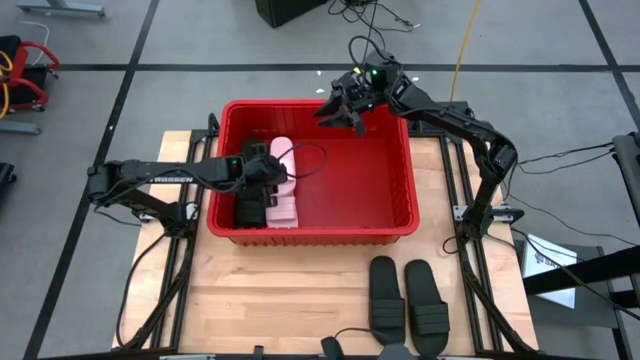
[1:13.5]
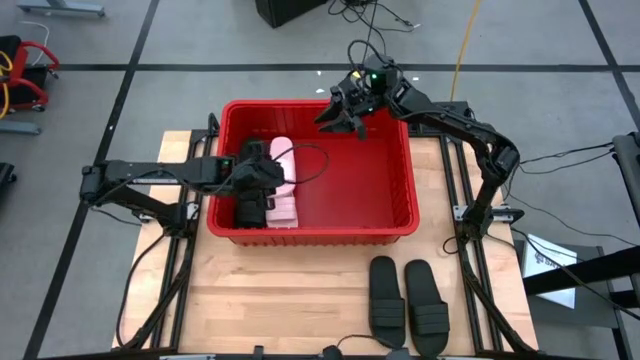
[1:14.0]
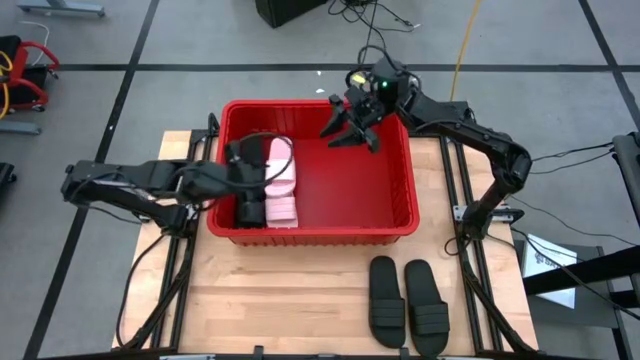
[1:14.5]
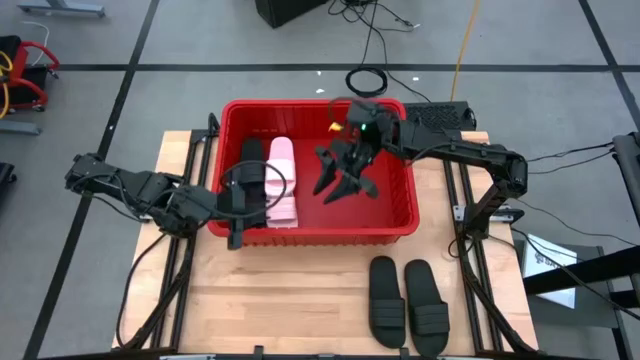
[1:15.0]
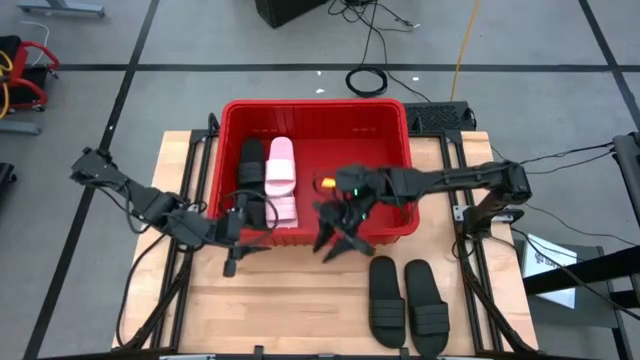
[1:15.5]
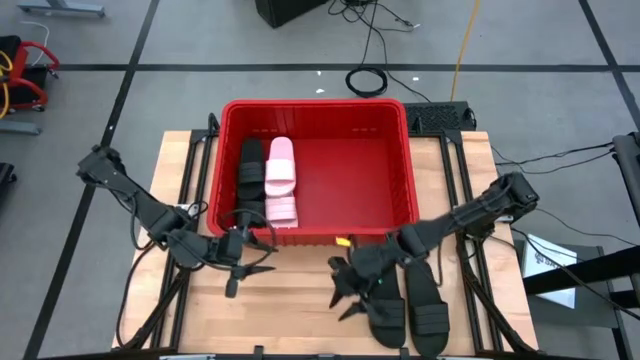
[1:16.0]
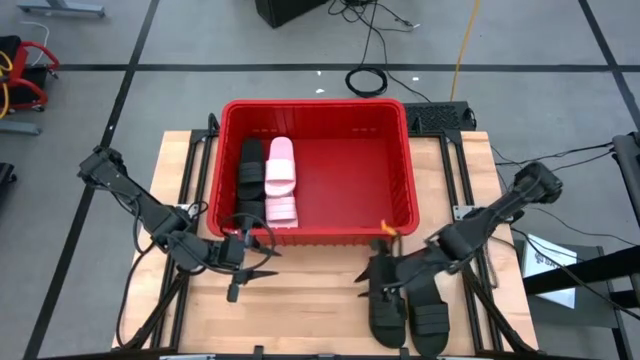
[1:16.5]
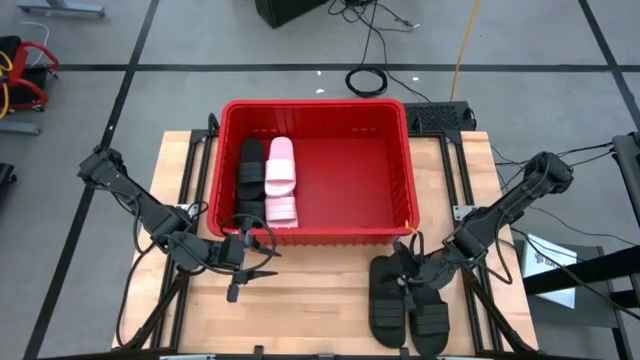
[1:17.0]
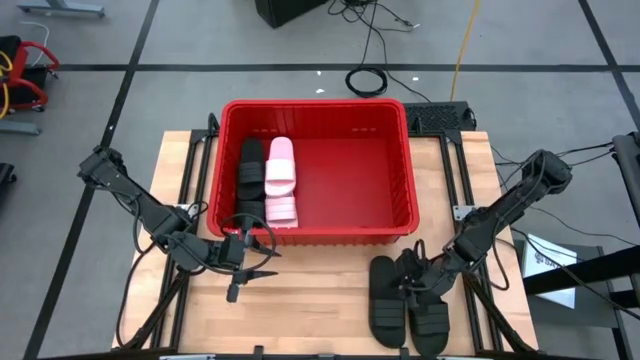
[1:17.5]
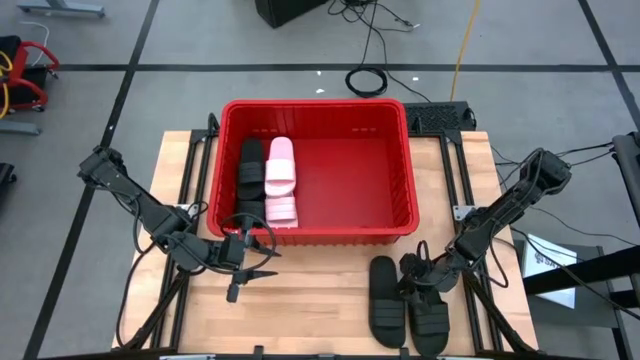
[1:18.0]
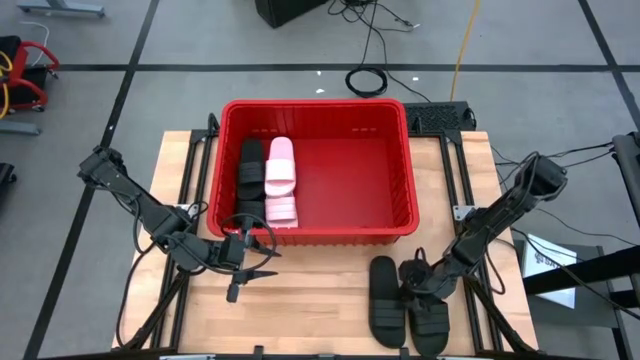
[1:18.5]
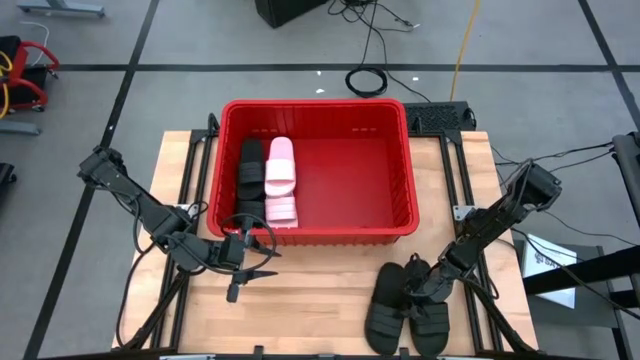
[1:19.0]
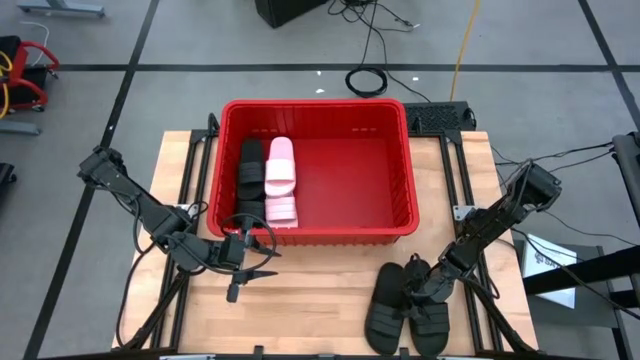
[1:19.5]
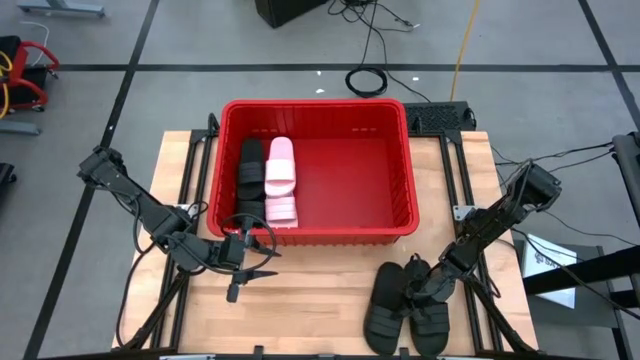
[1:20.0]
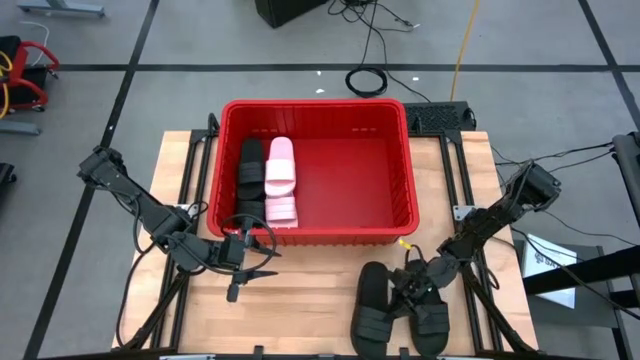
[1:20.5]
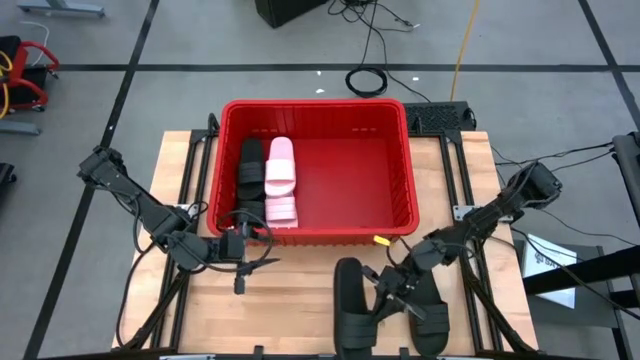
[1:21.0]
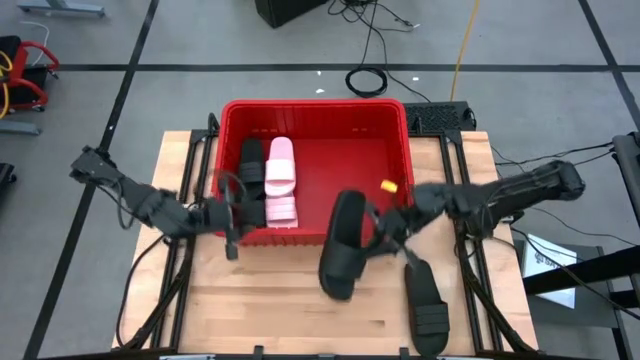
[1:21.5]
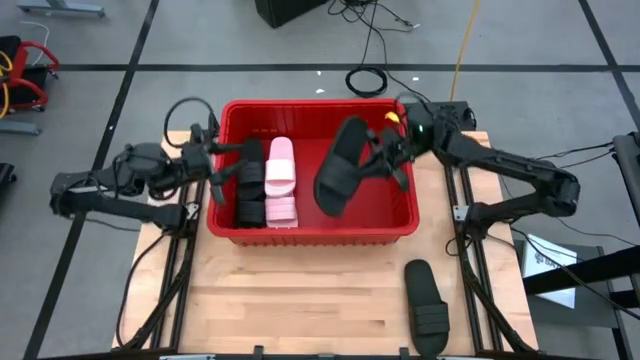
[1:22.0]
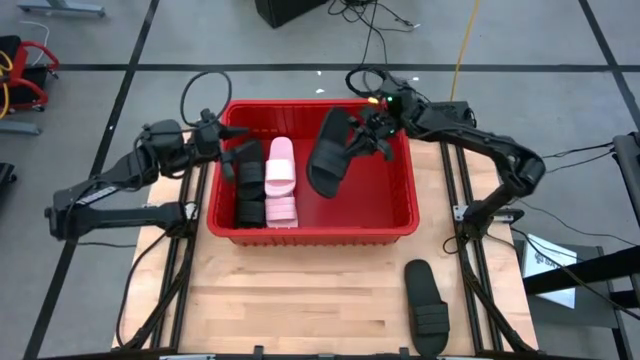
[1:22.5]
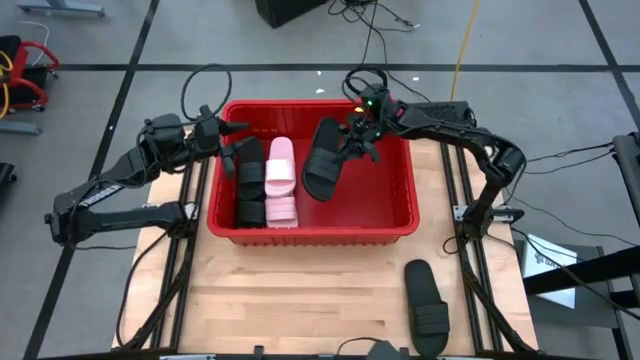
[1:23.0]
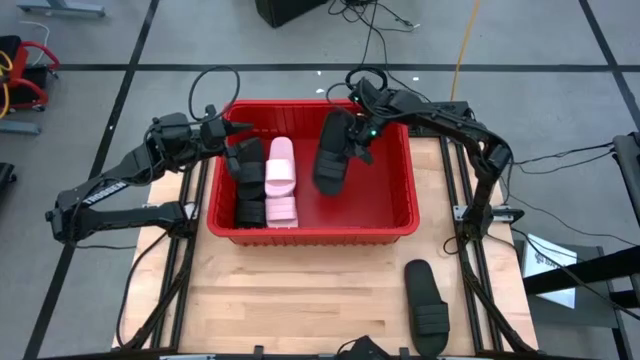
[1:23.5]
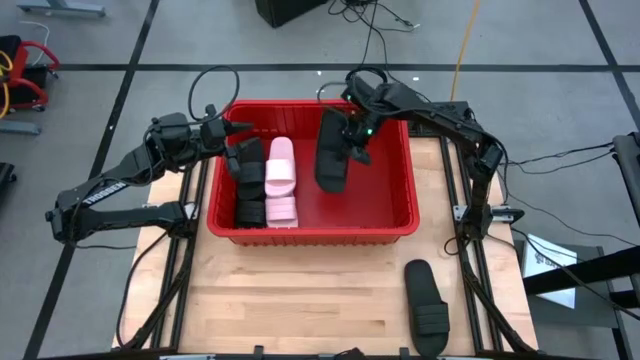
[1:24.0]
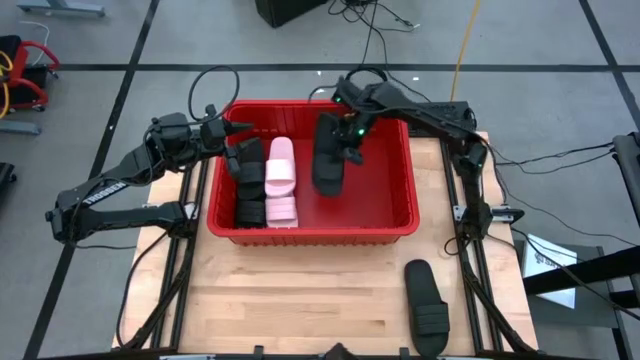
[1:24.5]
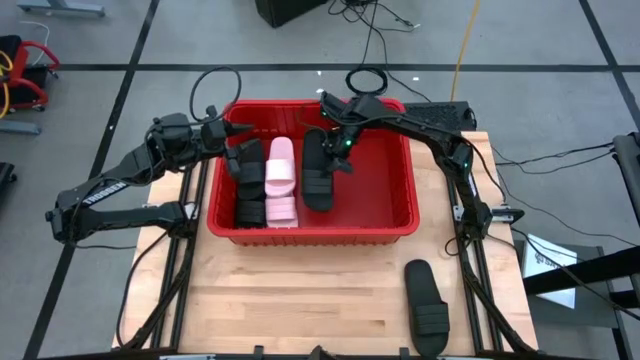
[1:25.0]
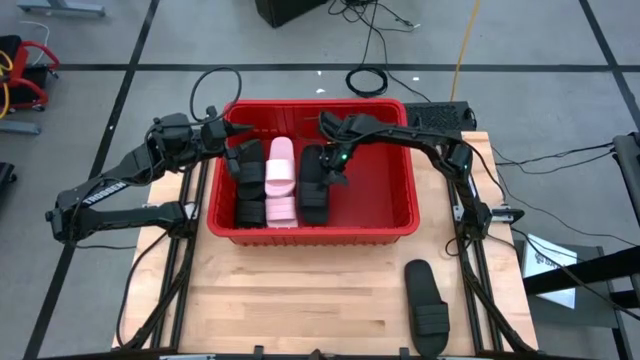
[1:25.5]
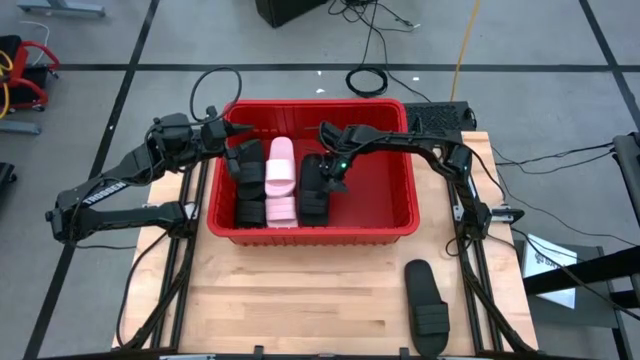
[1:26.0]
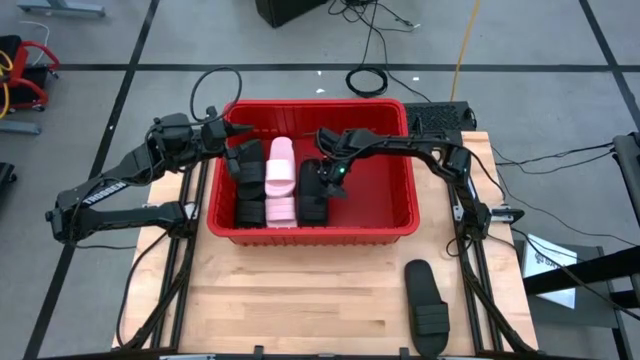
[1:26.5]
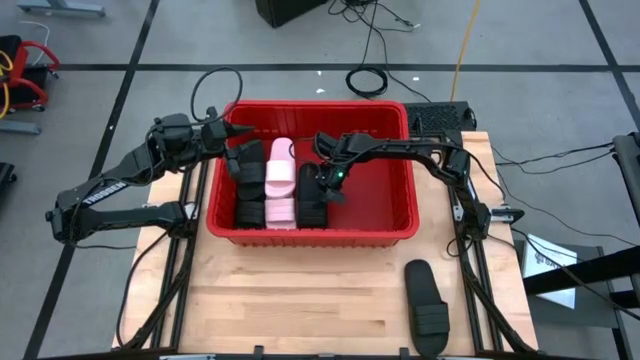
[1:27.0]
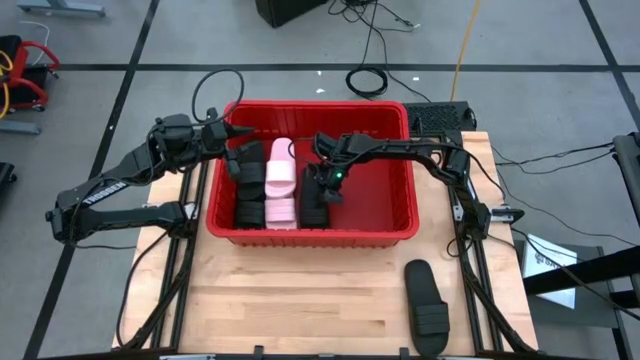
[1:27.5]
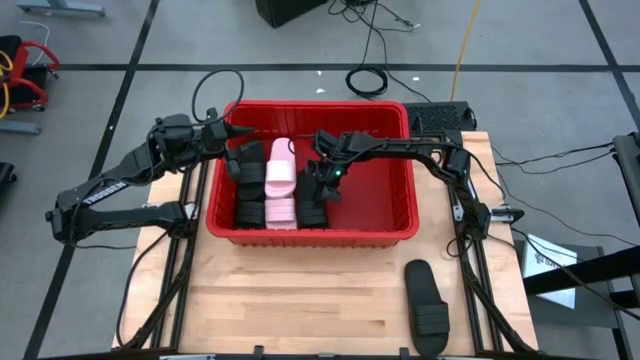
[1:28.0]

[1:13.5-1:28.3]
Task: Pick and place slides into bin
Put the black slipper into the red bin

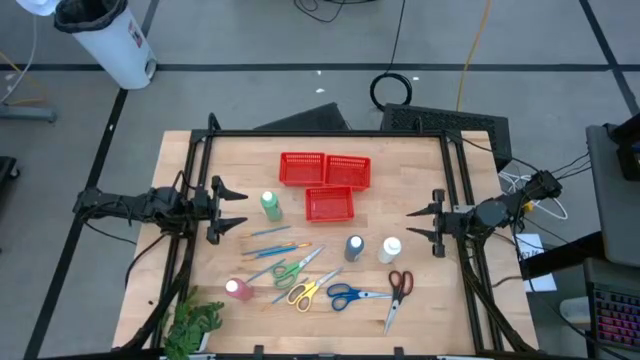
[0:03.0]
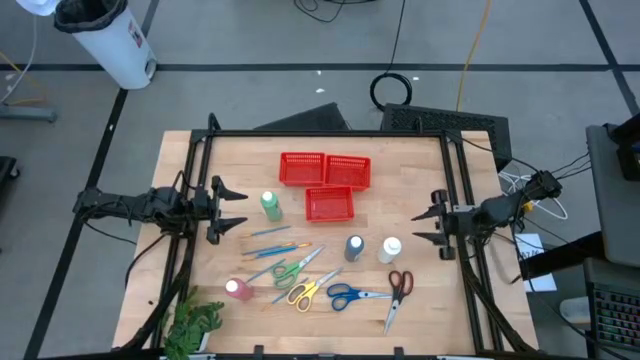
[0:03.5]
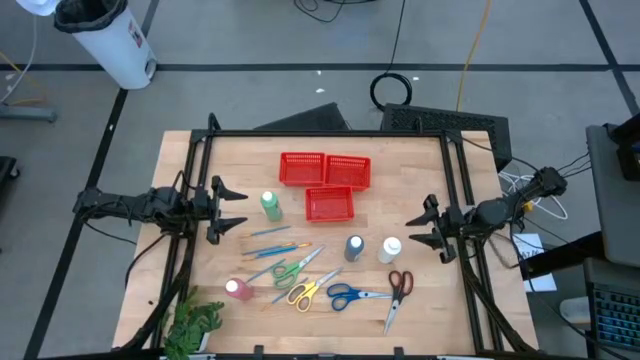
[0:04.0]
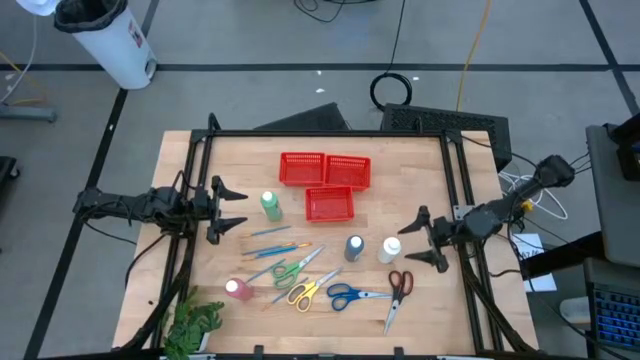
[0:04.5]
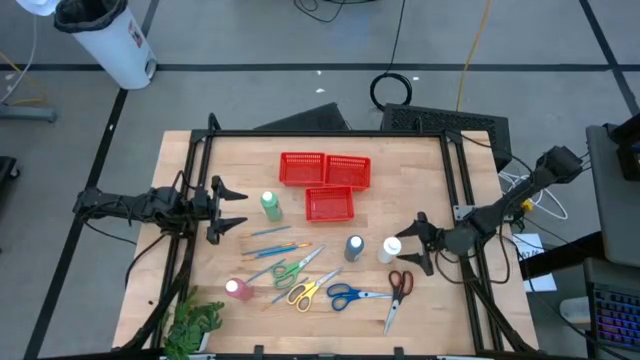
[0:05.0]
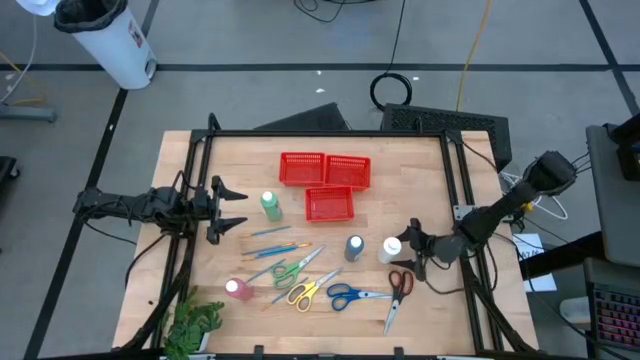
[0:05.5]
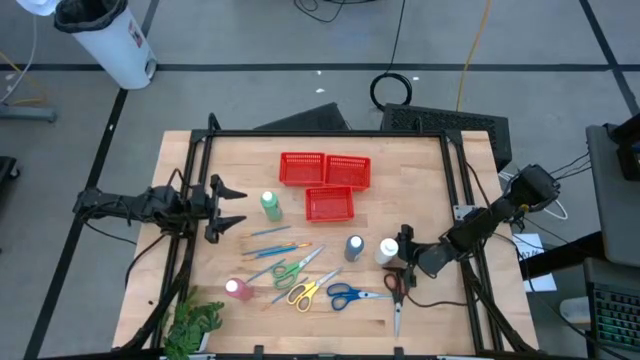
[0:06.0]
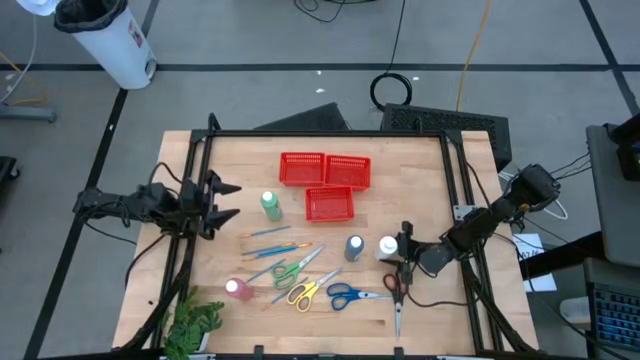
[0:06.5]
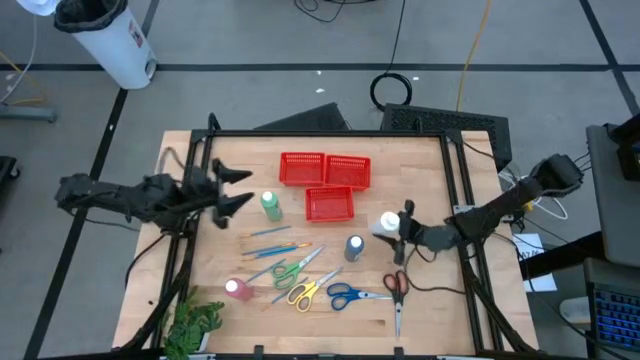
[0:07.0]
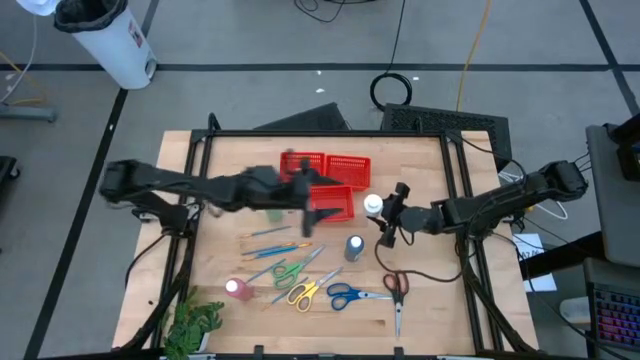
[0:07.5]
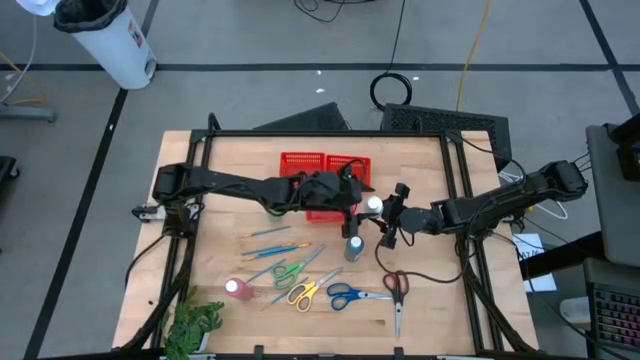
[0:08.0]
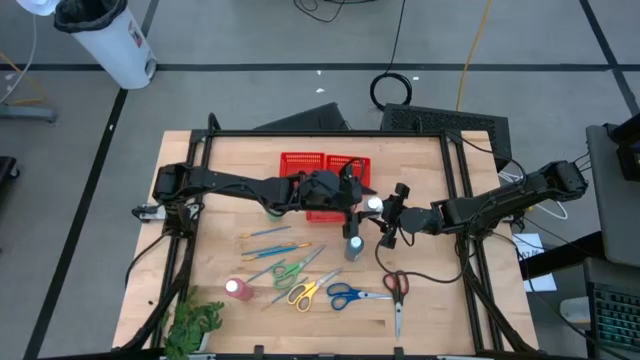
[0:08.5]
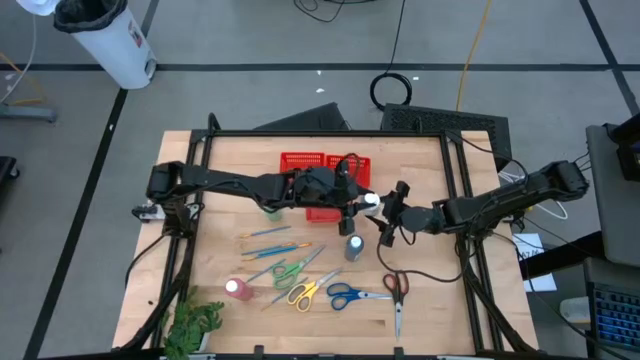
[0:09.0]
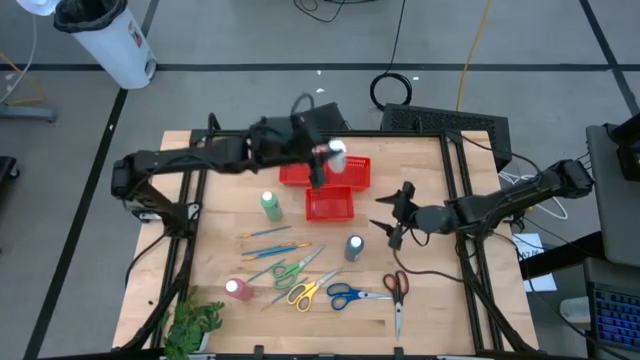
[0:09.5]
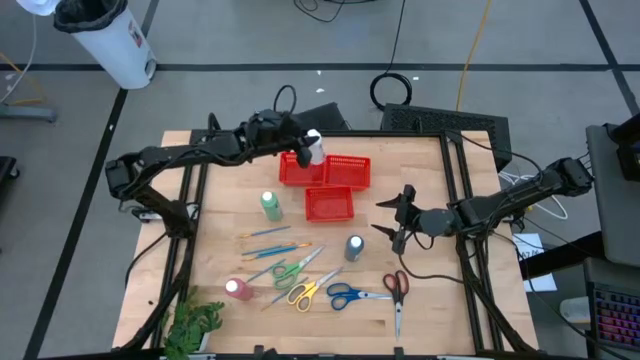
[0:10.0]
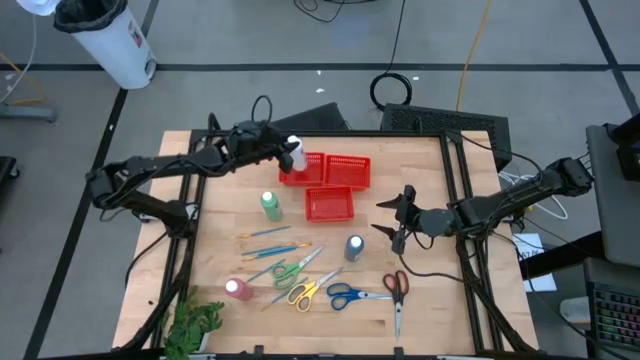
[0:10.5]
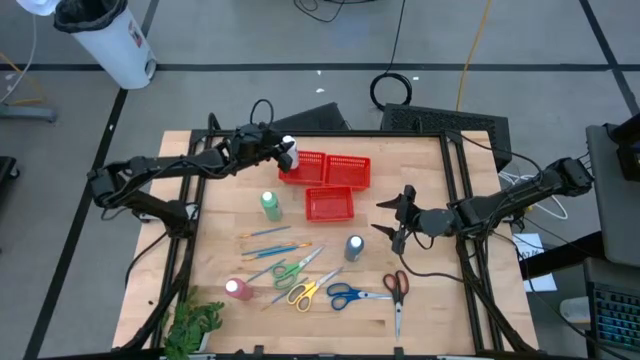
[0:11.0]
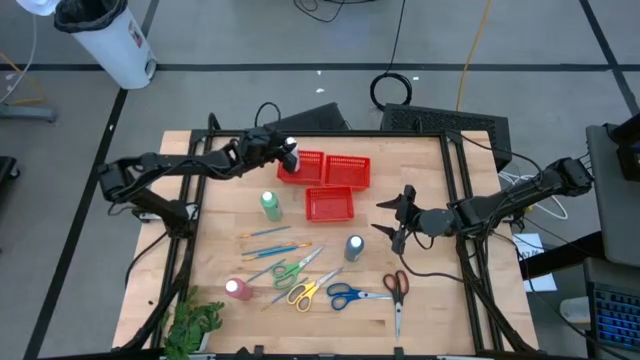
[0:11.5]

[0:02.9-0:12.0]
Task: Pick & Place Paint Supplies
Put the white paint bottle into the top left red bin
